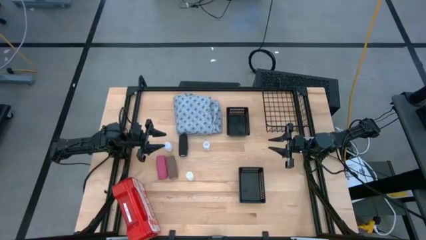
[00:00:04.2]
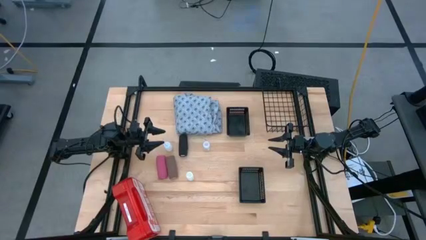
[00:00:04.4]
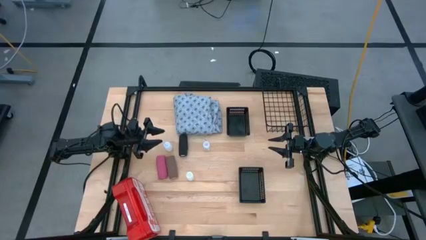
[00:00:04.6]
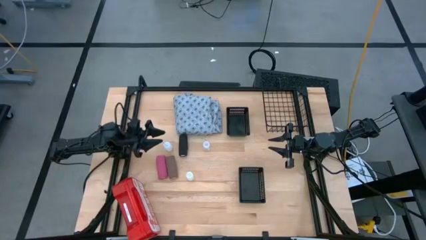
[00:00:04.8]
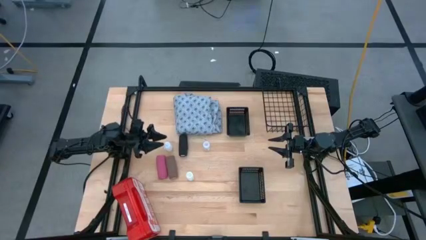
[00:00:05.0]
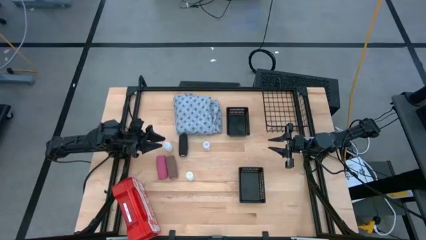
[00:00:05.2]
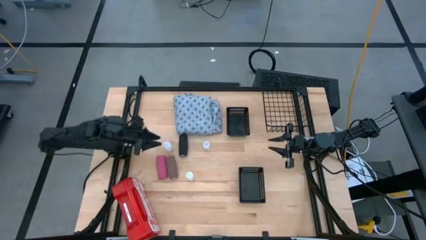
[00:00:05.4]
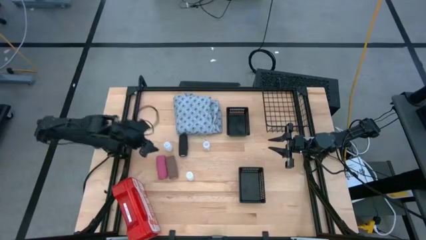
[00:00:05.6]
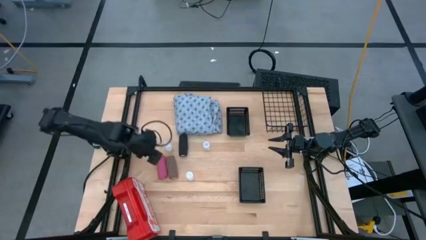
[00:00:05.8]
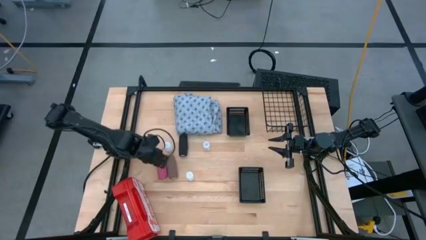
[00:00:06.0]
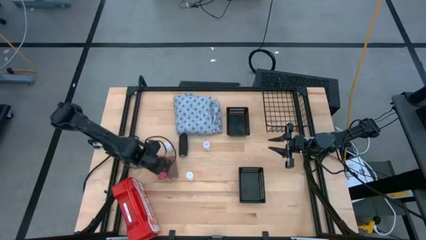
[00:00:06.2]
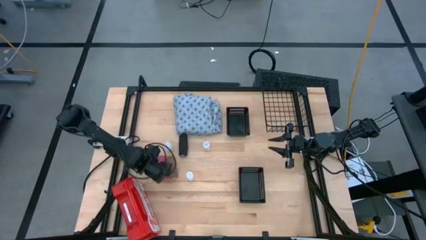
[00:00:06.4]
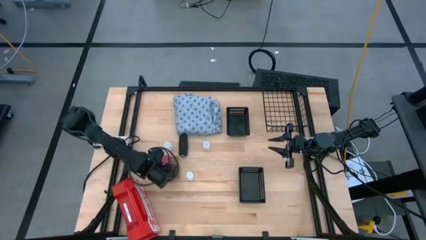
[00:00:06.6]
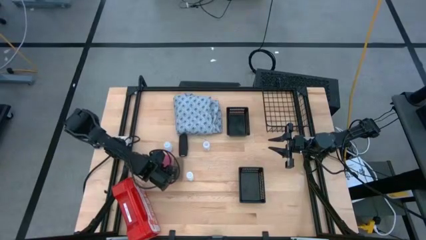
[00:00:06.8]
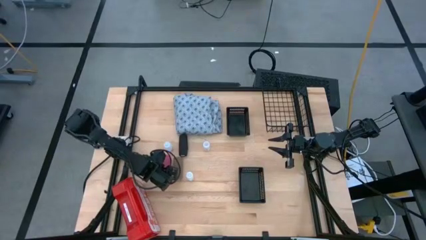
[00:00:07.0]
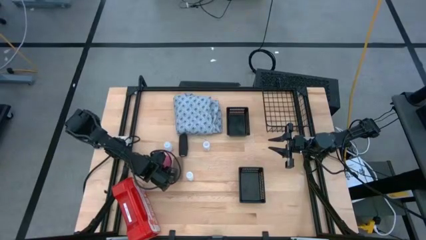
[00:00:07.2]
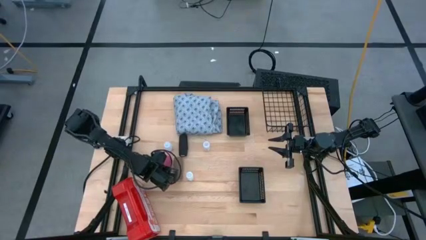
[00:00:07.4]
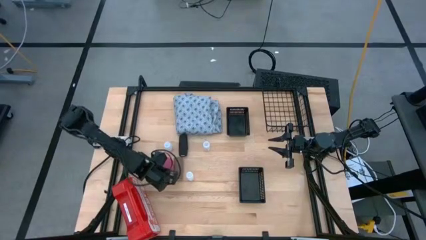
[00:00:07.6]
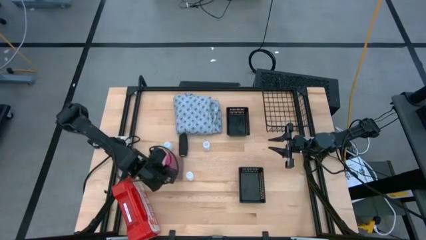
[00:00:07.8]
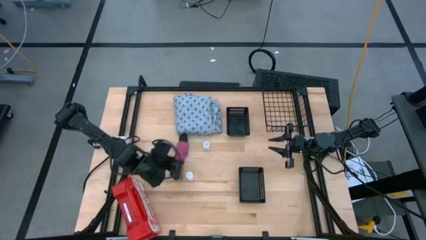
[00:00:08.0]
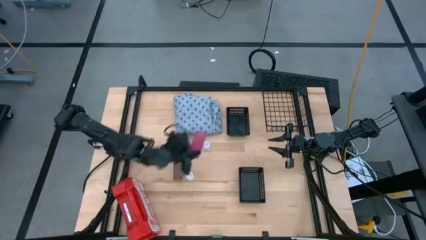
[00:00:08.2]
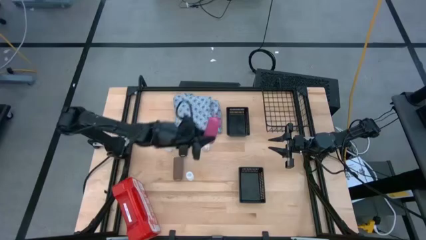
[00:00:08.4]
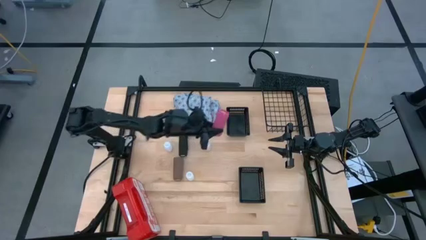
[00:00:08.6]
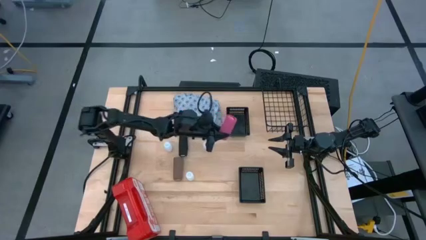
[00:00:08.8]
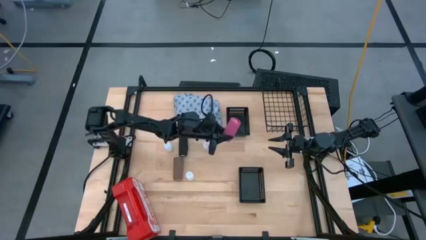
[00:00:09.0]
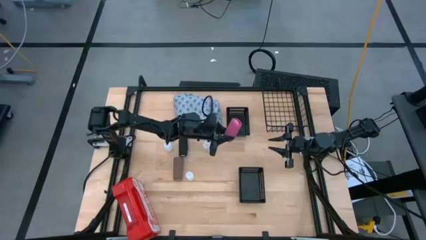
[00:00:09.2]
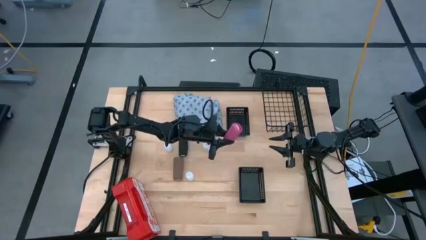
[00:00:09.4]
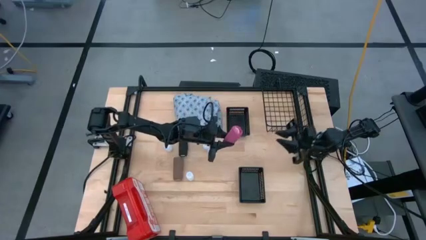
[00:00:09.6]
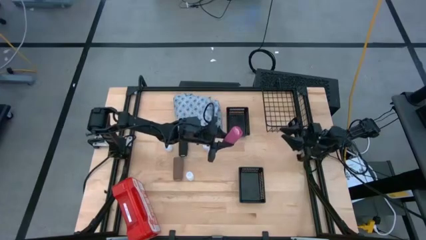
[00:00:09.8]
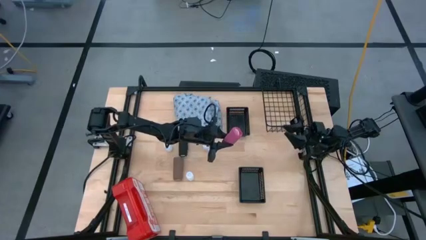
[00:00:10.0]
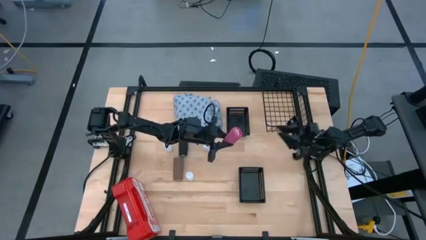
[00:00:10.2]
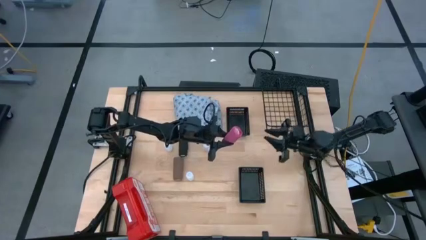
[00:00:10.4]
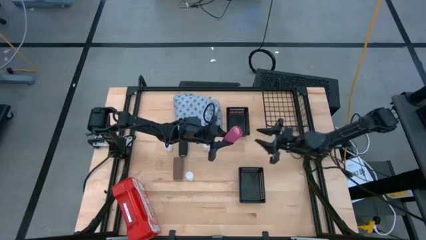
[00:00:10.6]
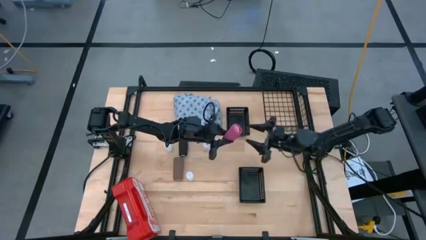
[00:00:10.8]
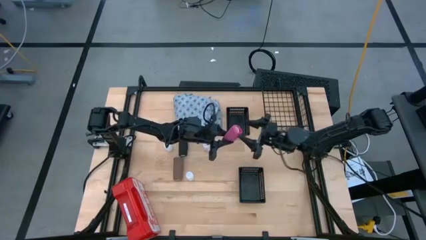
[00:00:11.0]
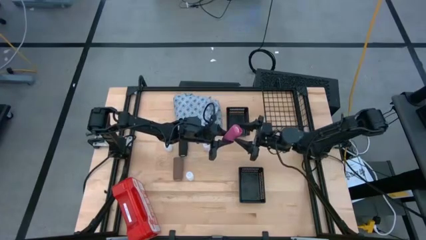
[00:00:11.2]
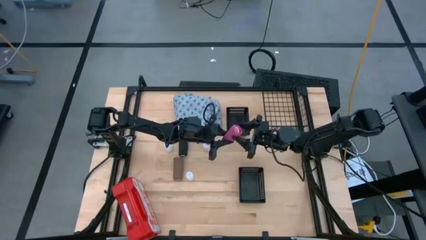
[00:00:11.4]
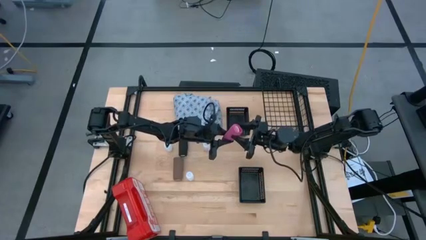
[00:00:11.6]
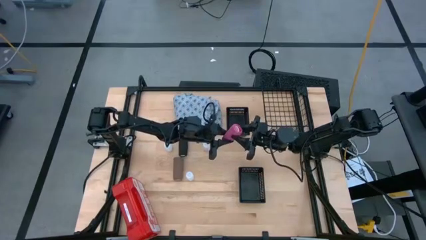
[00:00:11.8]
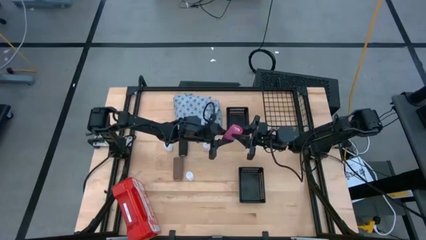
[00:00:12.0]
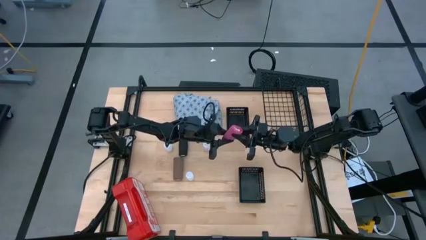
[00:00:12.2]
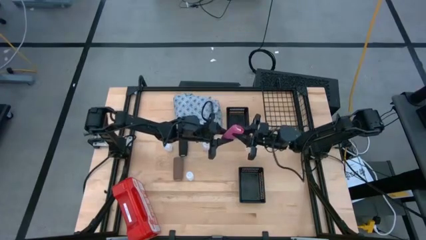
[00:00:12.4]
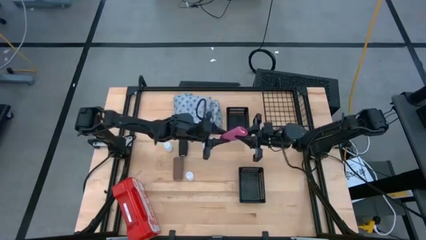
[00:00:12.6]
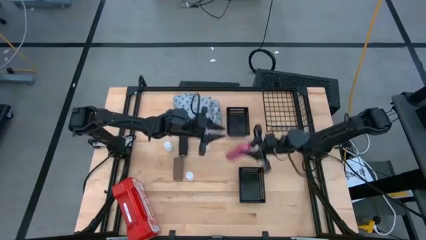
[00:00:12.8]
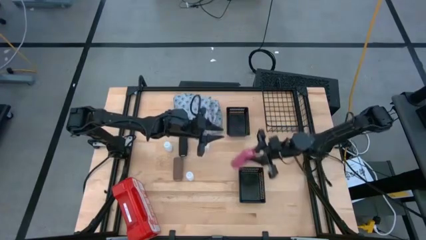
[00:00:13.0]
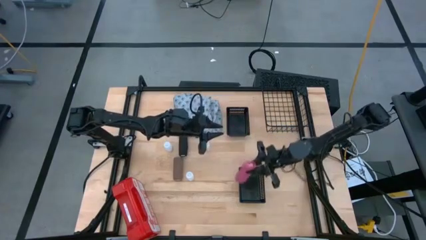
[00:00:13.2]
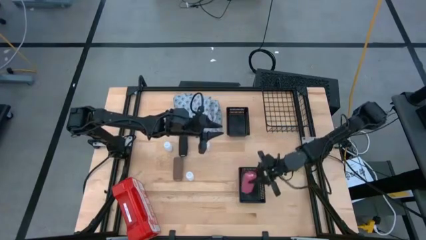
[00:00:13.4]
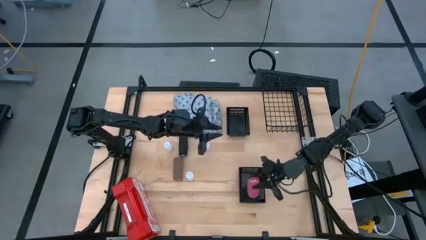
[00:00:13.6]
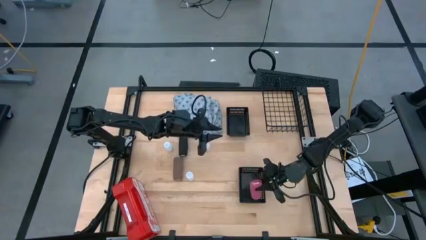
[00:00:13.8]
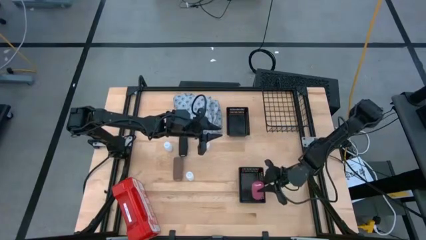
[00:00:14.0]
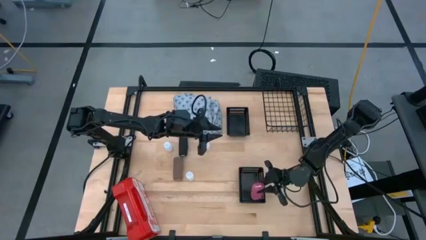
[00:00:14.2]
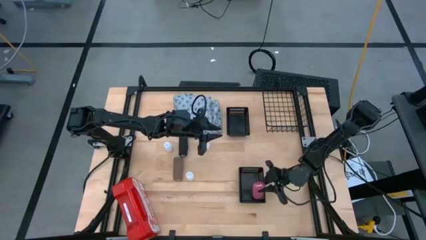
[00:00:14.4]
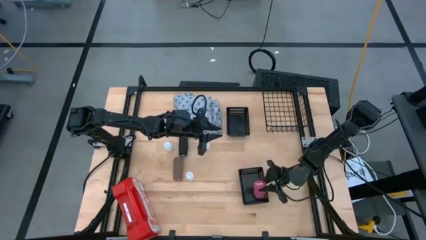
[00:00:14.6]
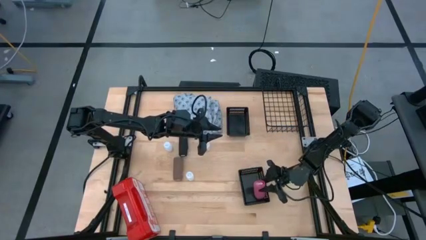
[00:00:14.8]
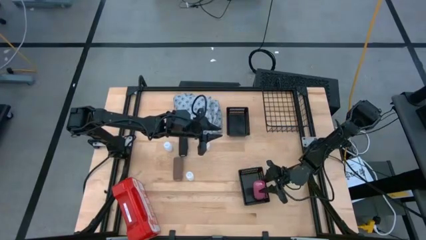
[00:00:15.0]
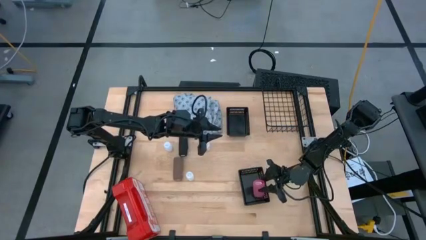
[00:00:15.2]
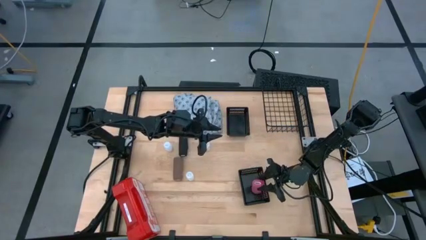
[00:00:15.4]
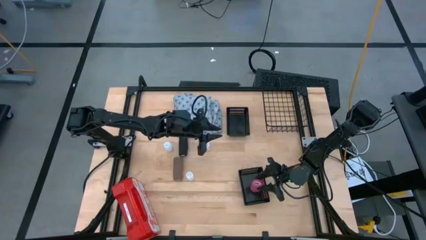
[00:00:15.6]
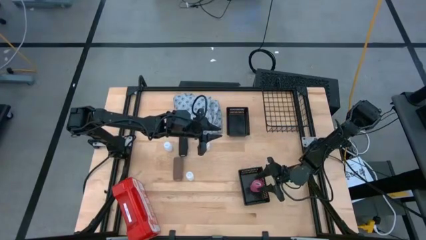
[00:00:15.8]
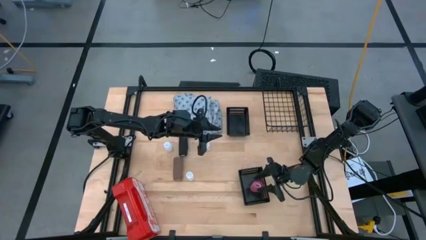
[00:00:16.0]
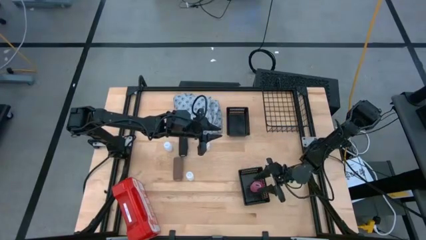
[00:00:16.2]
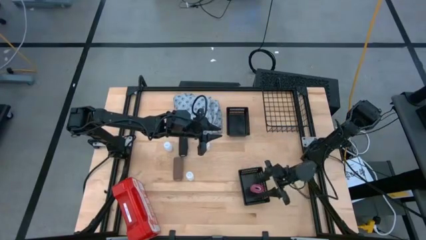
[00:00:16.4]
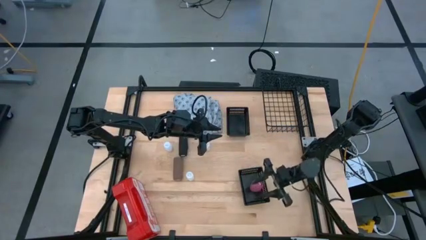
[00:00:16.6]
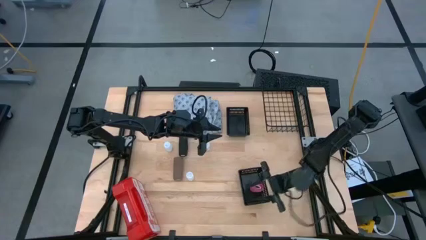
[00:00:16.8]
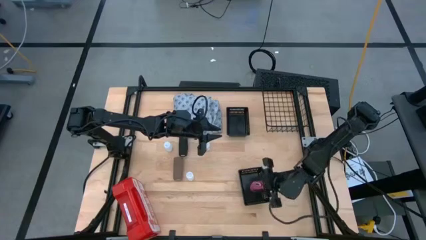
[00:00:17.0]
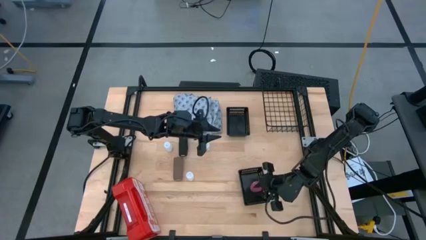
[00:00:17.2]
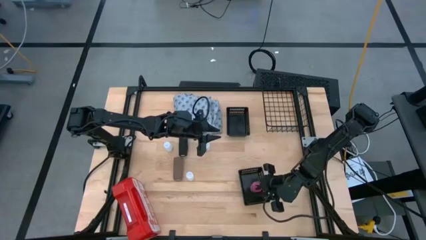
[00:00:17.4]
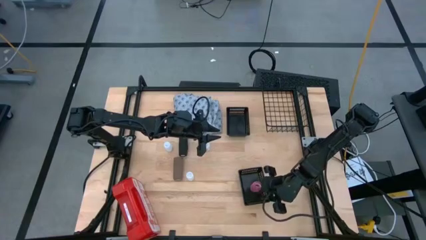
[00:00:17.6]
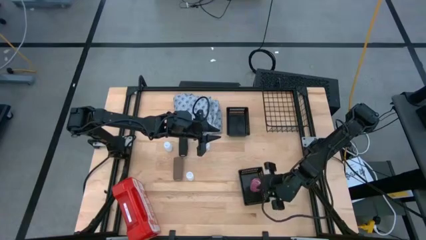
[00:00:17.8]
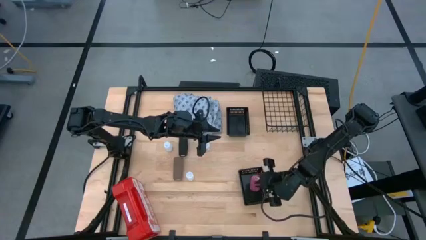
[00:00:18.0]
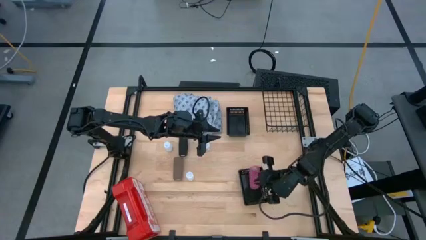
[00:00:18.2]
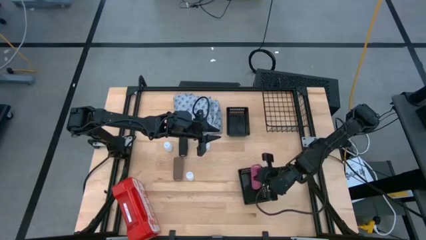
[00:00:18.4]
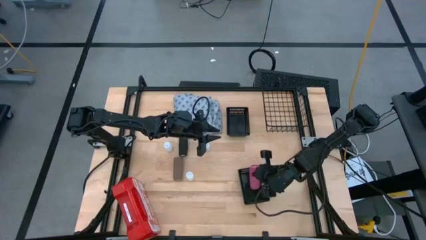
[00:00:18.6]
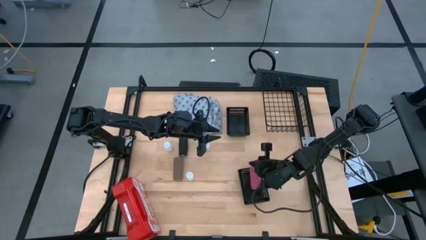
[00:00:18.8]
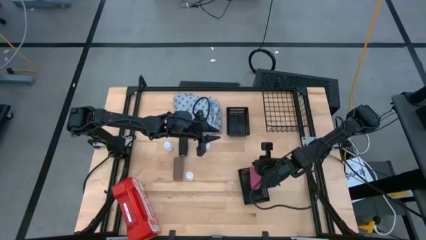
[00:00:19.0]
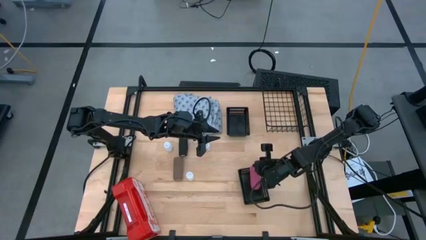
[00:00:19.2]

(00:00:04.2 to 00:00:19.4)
Task: Pick & Place Medicine items
Put the pink bandage into the bottom black basket
